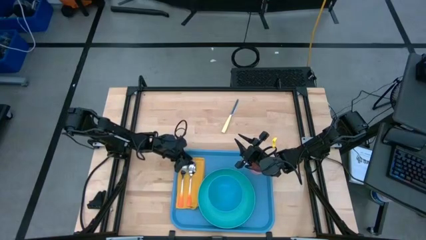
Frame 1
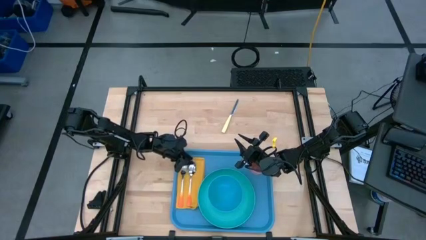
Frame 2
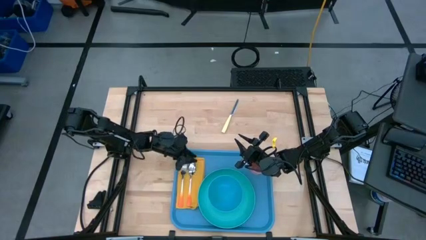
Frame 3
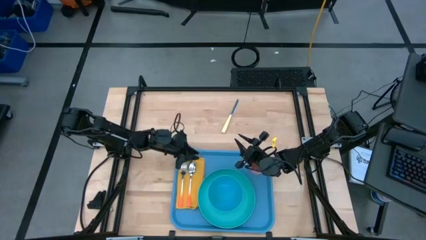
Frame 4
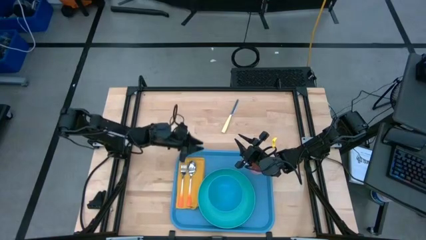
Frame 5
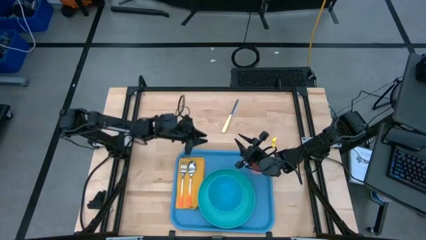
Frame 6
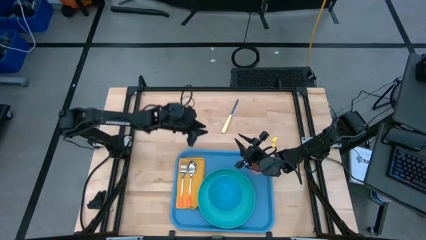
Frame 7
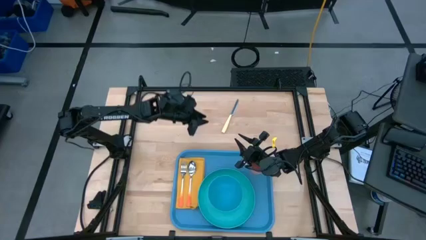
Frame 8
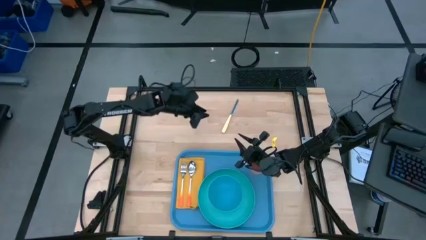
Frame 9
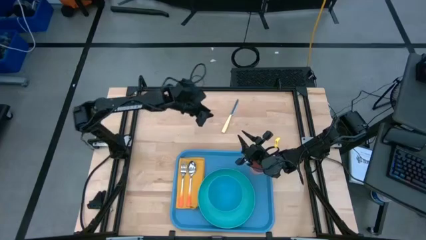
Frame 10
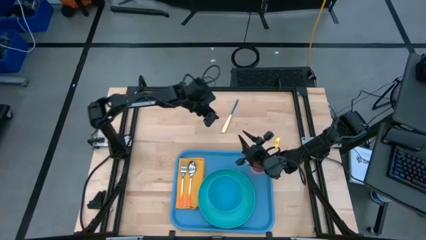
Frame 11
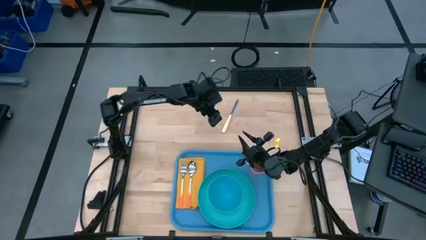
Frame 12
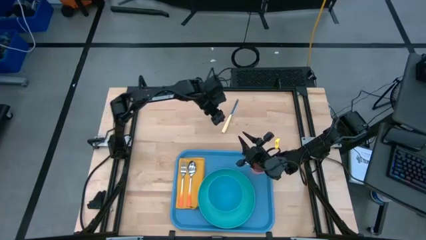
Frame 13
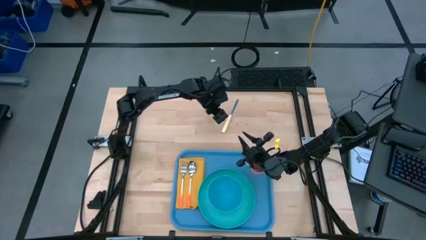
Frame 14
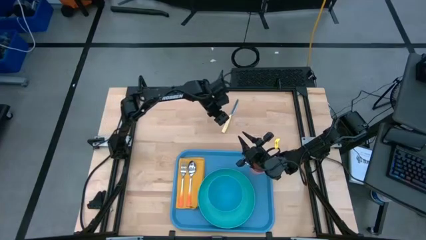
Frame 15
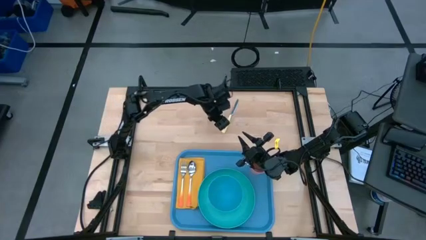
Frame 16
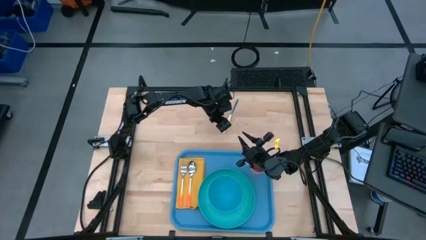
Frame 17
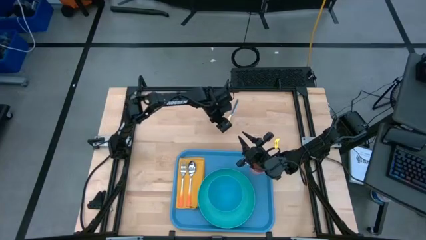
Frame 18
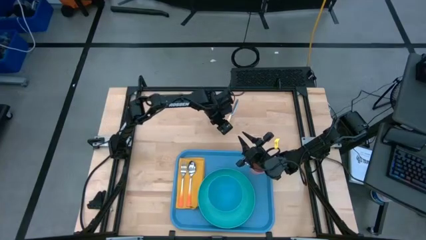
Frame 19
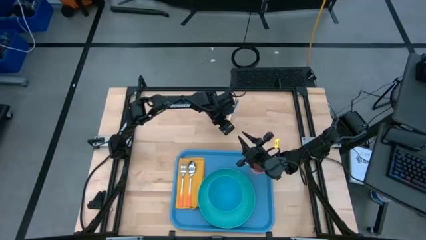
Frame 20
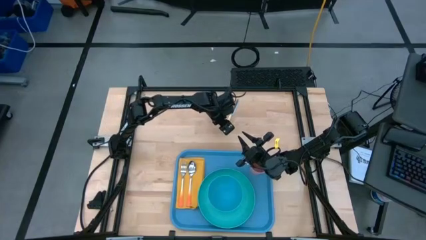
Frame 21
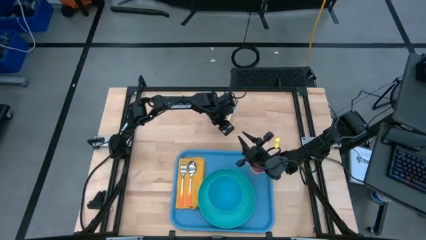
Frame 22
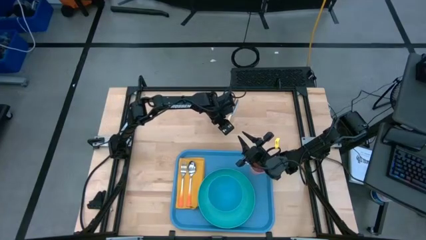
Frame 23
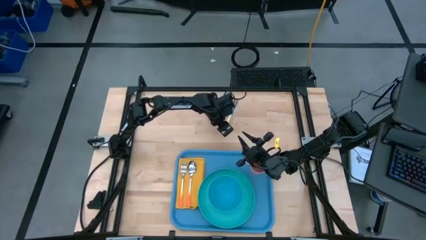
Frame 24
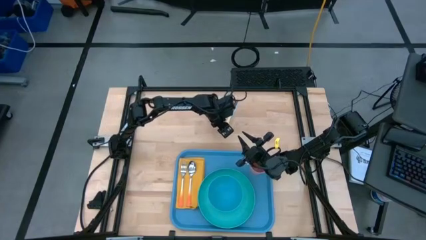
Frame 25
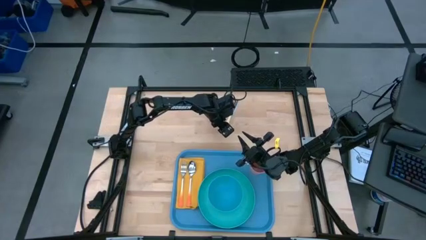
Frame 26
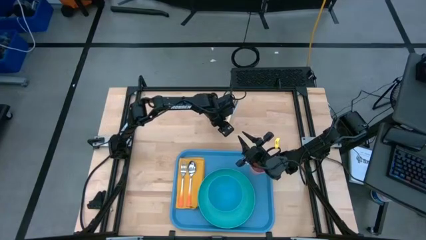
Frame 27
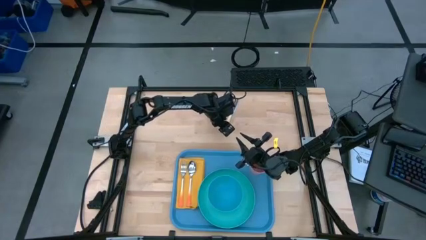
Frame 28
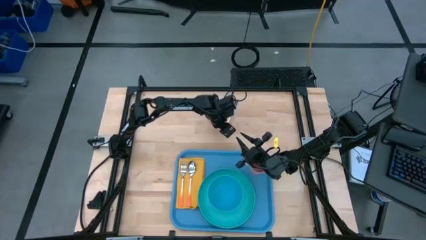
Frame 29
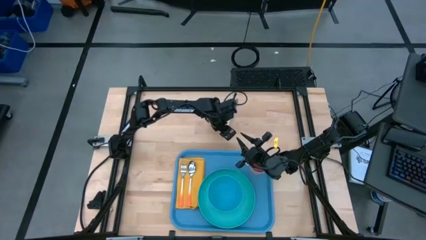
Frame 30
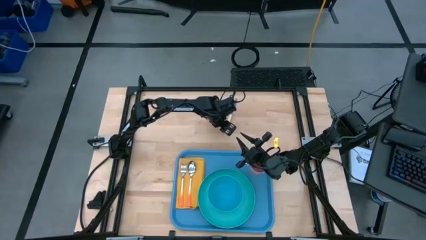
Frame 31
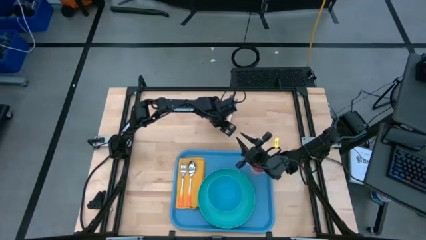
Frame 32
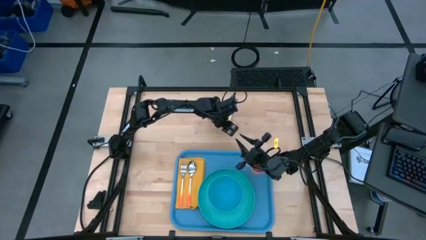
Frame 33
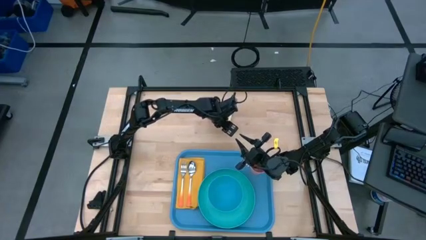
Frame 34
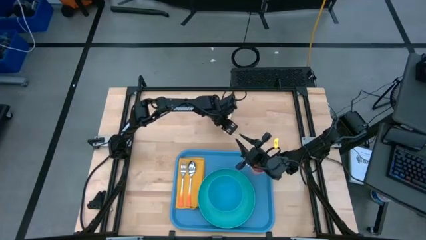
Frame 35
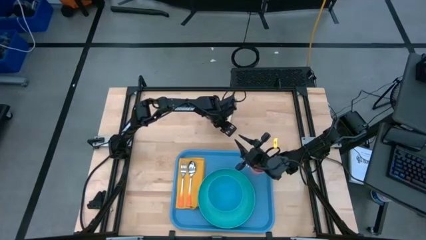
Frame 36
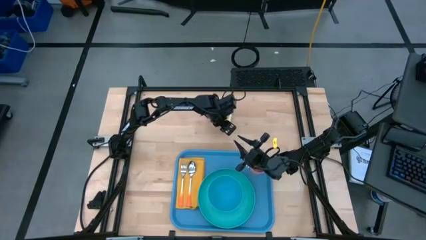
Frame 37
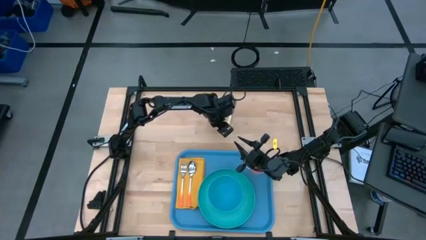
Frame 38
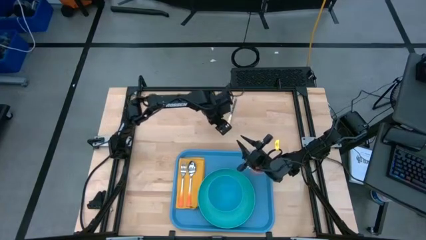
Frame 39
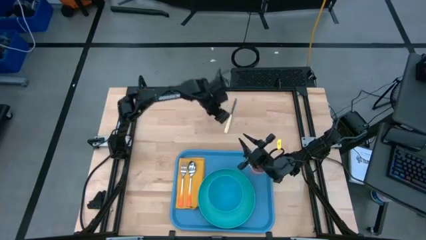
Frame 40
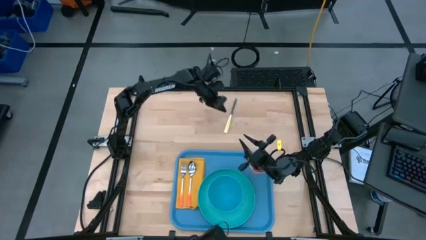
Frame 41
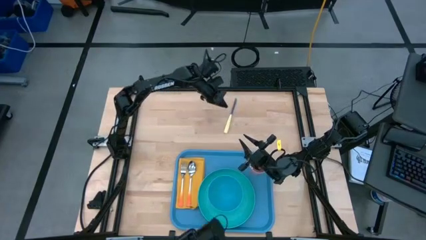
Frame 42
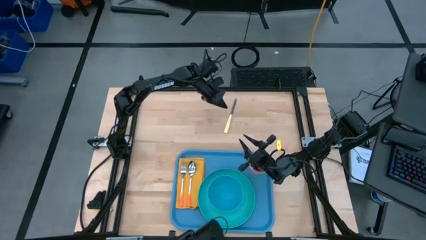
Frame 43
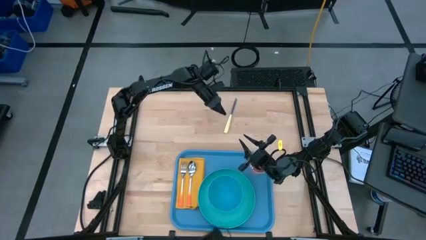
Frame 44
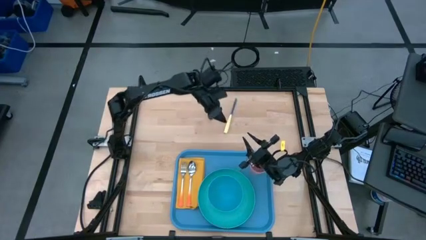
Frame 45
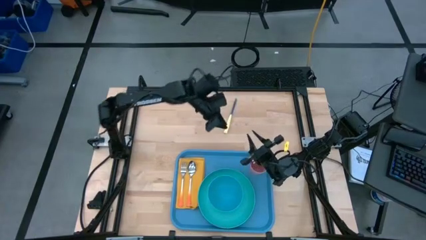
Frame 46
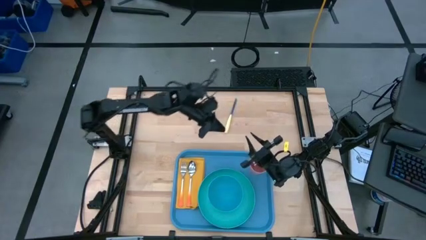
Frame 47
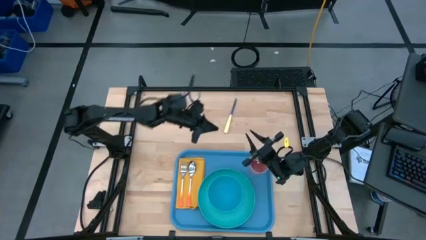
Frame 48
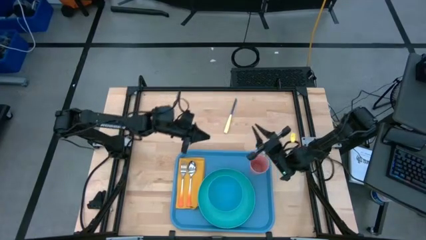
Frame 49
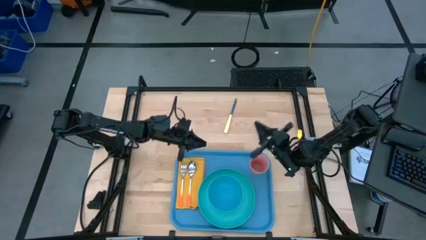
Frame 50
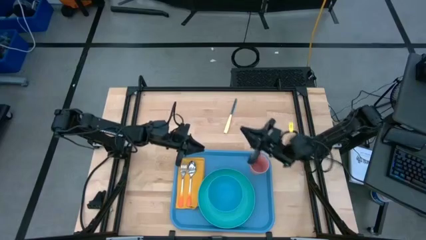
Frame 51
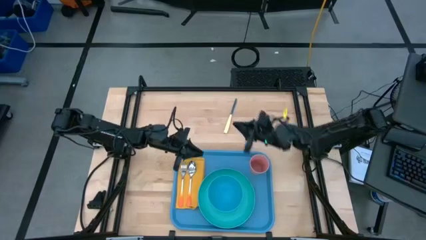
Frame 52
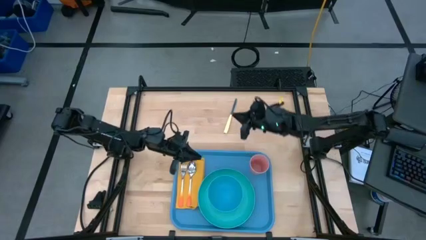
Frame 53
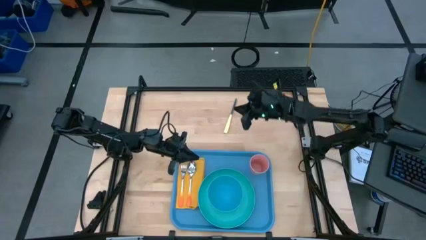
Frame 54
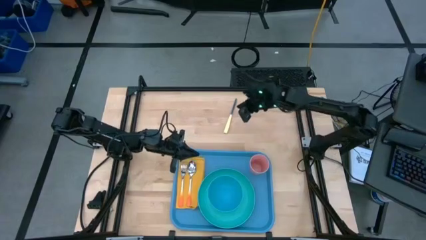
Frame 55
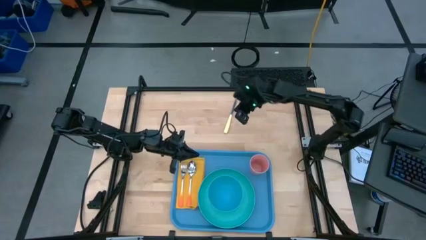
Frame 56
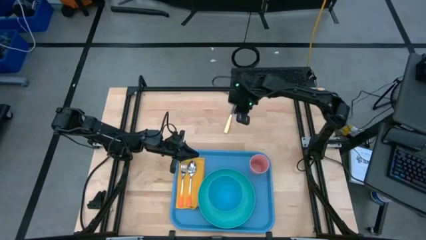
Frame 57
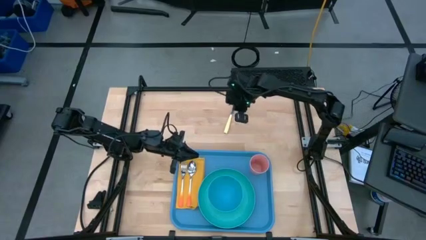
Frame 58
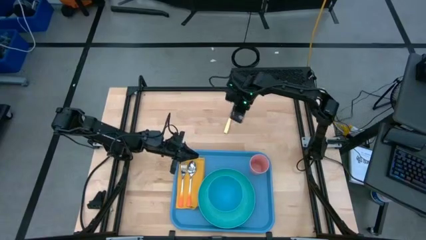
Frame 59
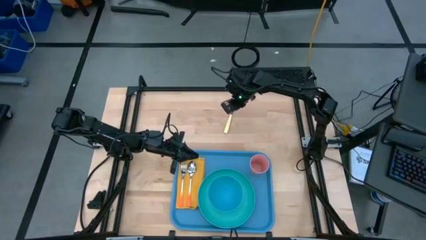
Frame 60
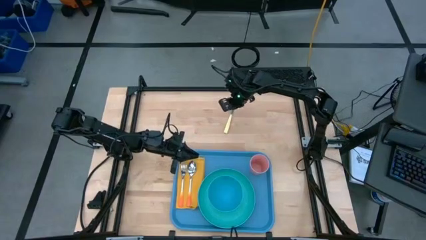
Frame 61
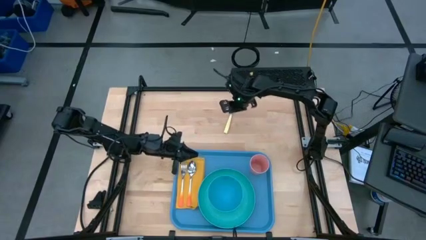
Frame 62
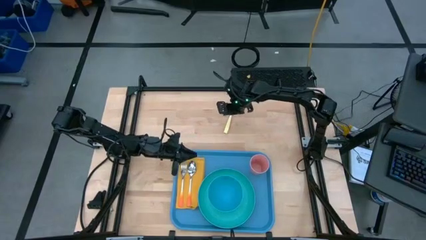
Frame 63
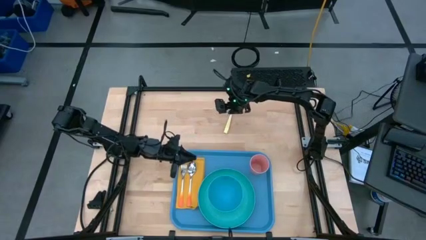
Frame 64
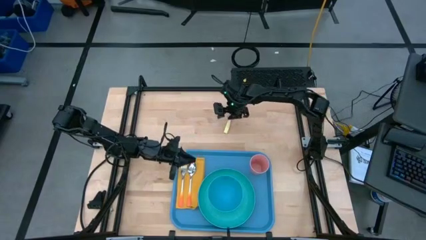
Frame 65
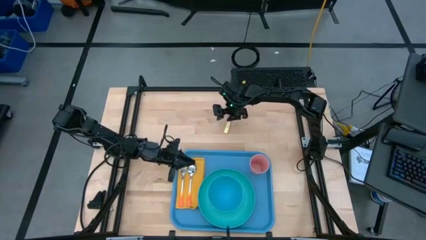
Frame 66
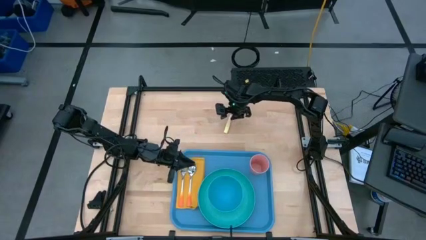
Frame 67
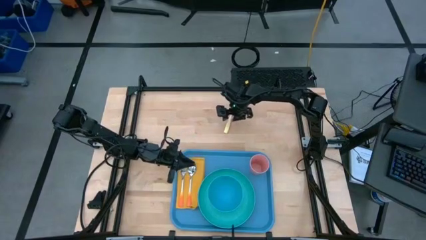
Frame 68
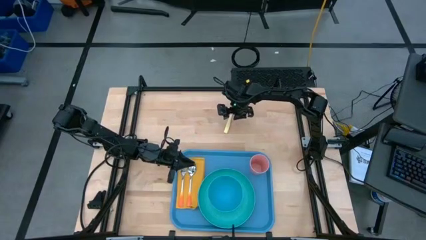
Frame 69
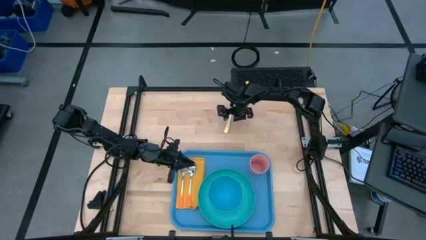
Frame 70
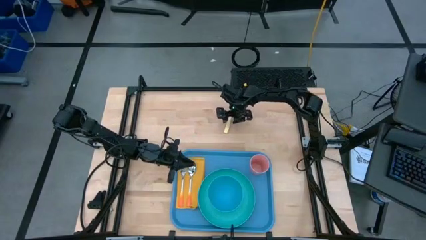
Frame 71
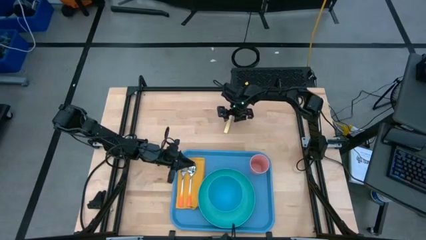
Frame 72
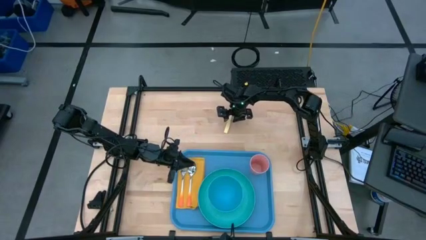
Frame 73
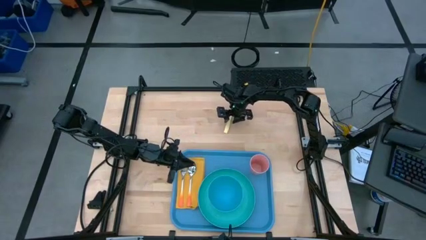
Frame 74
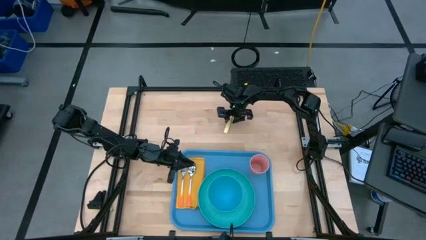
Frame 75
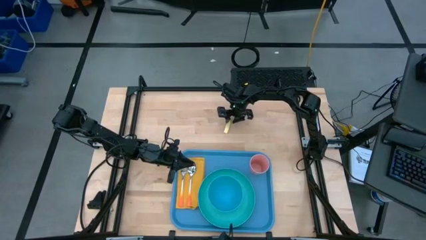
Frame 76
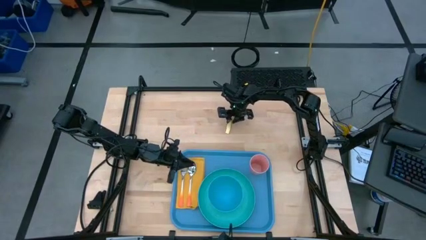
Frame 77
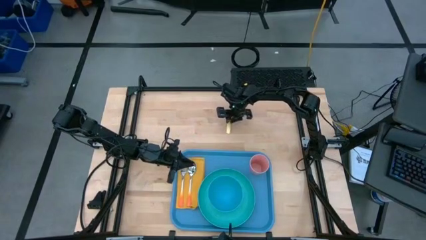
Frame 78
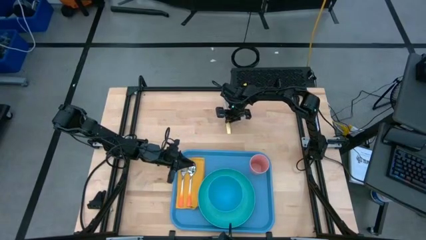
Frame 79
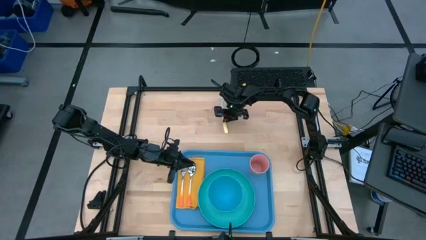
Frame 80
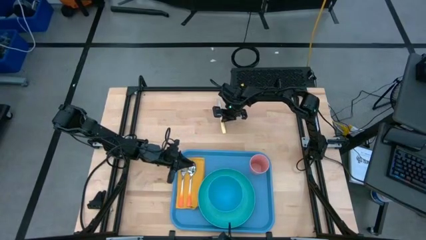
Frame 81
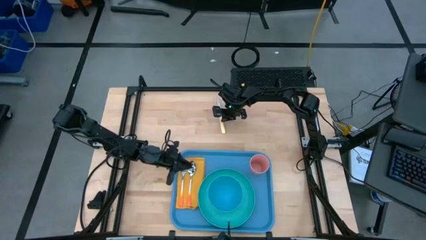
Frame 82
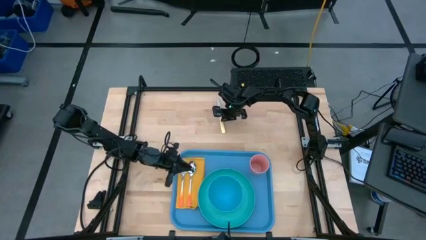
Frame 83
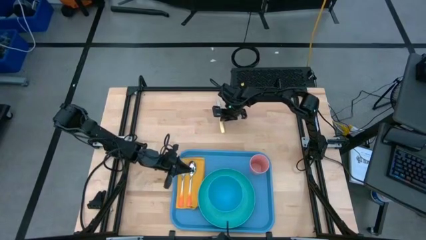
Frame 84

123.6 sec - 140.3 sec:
Task: Set up tray
Put the yellow knife to the right of the orange spoon on the orange napkin on the blue serving tray
